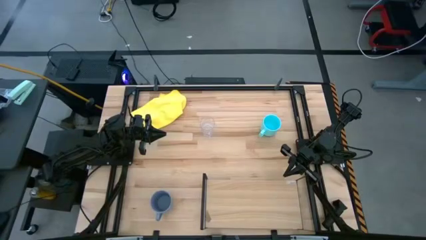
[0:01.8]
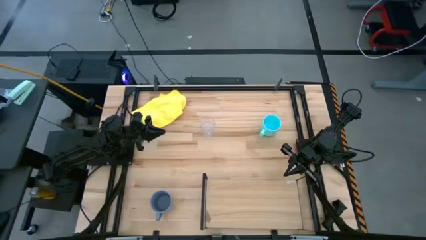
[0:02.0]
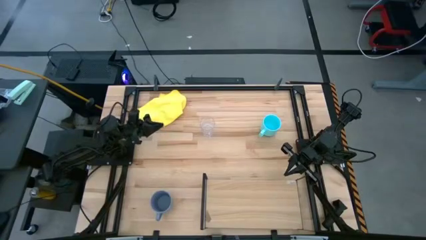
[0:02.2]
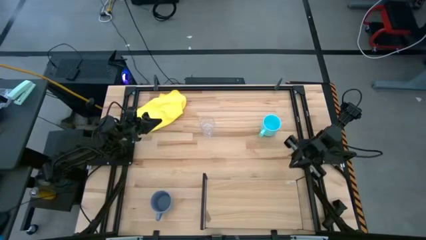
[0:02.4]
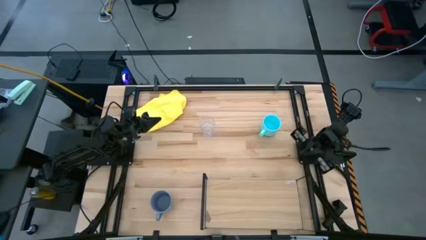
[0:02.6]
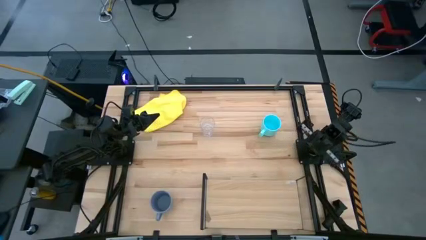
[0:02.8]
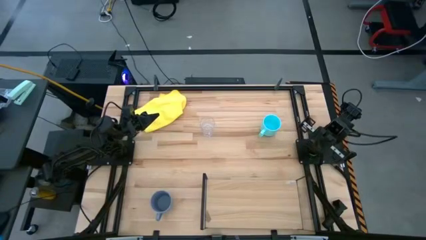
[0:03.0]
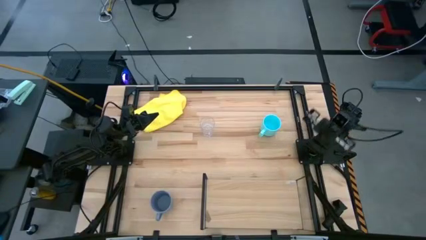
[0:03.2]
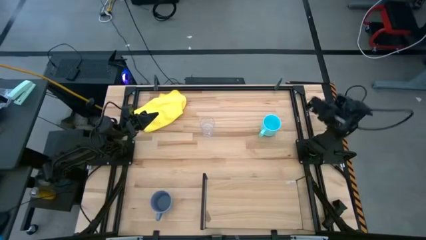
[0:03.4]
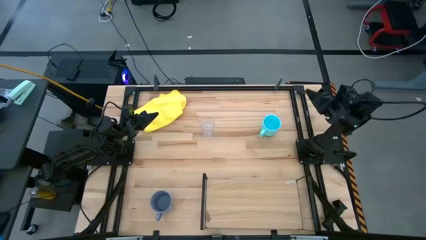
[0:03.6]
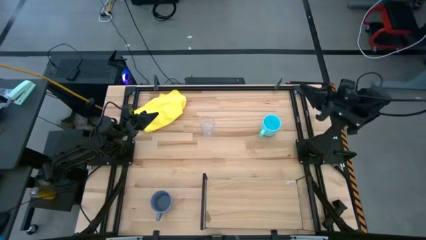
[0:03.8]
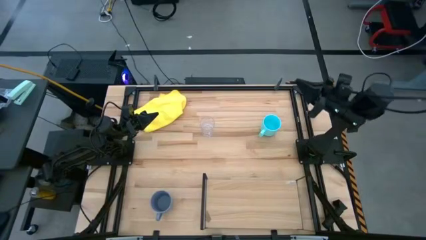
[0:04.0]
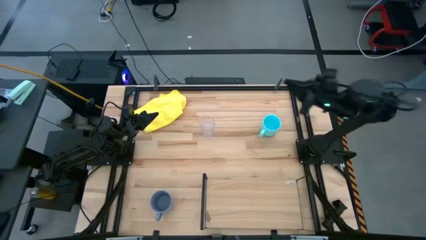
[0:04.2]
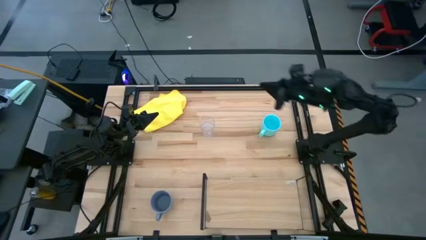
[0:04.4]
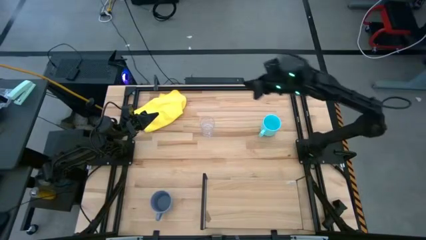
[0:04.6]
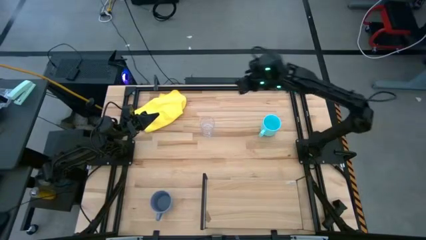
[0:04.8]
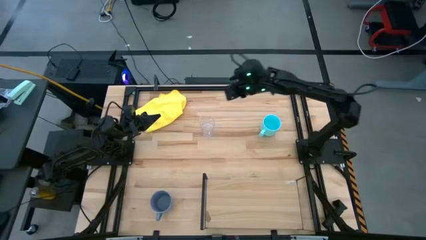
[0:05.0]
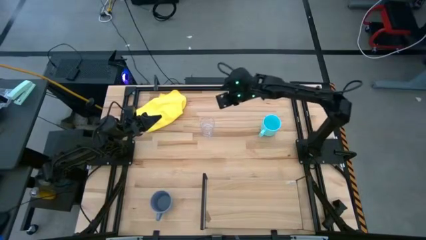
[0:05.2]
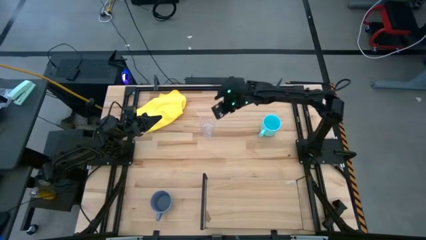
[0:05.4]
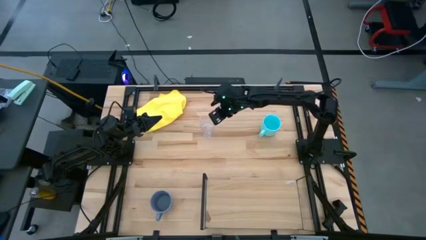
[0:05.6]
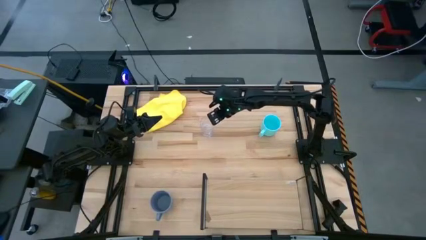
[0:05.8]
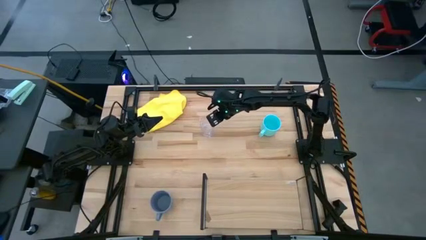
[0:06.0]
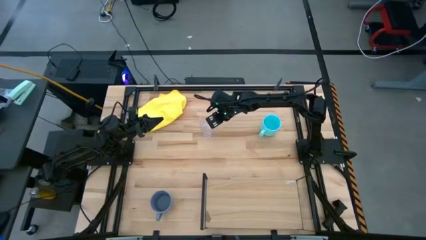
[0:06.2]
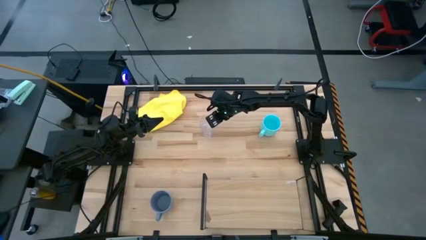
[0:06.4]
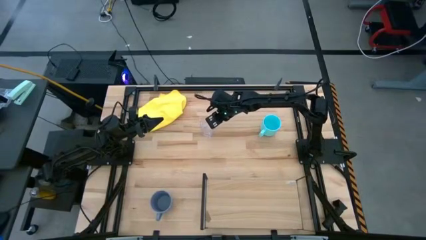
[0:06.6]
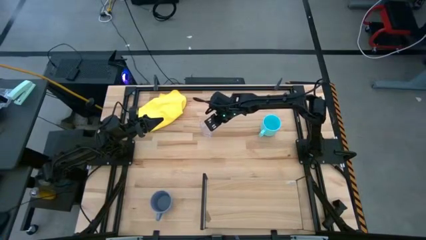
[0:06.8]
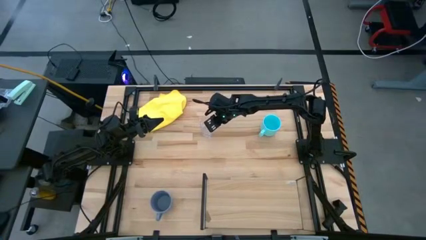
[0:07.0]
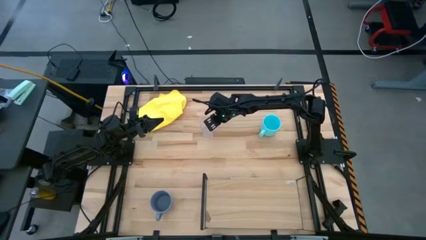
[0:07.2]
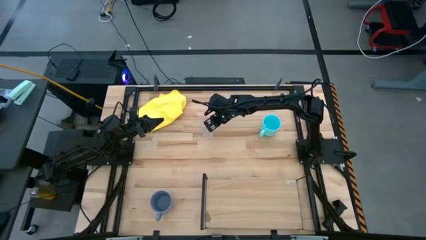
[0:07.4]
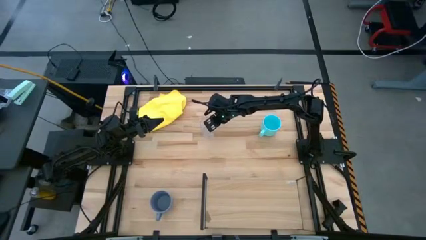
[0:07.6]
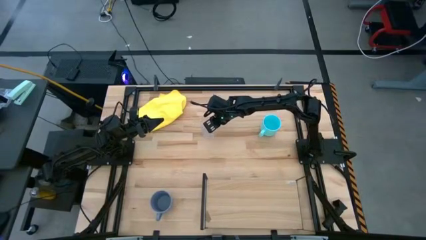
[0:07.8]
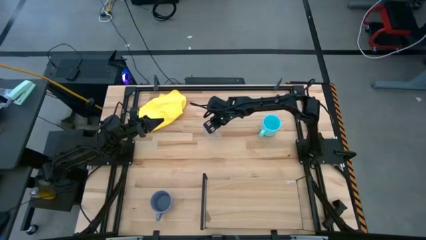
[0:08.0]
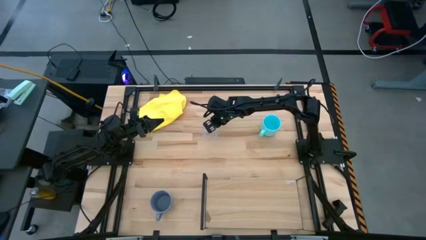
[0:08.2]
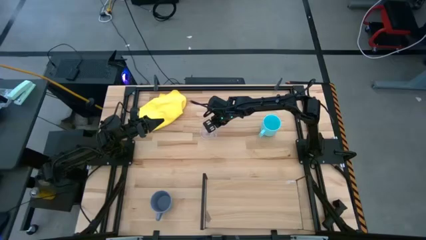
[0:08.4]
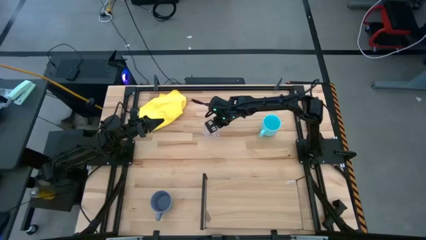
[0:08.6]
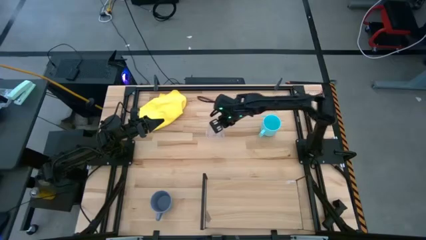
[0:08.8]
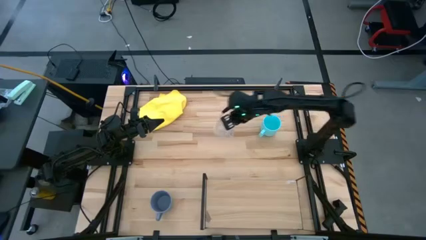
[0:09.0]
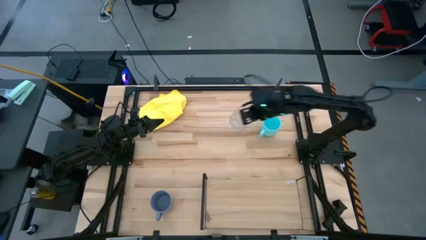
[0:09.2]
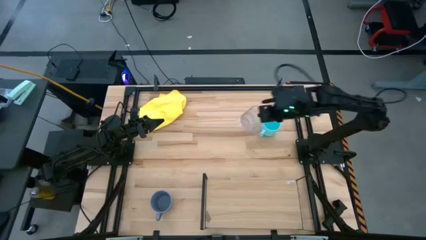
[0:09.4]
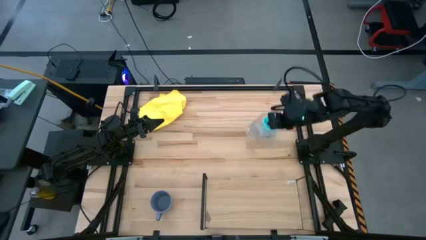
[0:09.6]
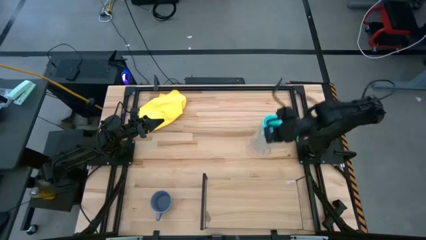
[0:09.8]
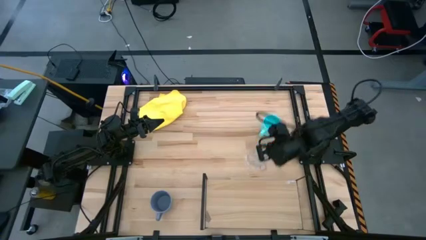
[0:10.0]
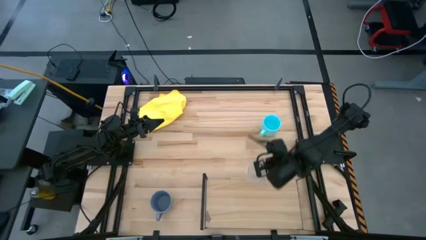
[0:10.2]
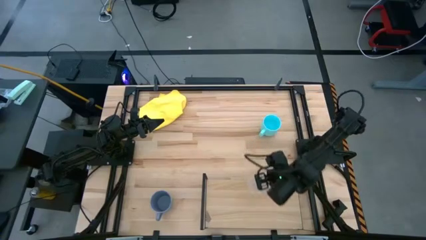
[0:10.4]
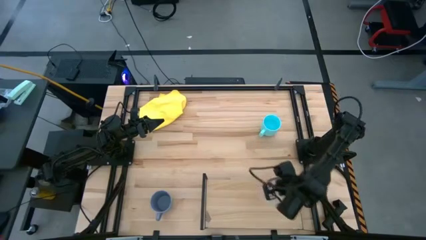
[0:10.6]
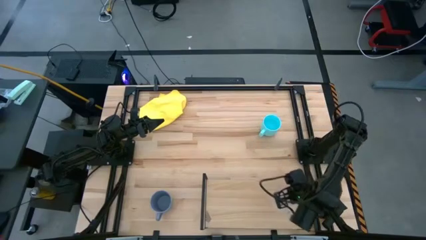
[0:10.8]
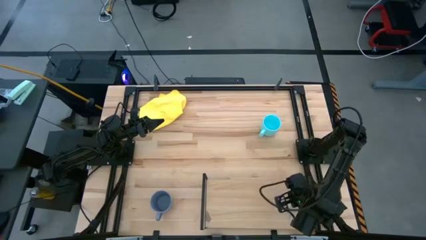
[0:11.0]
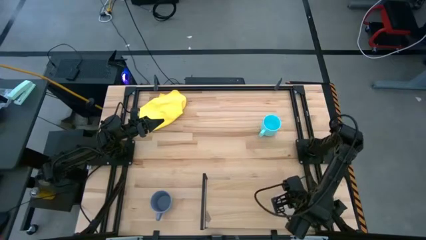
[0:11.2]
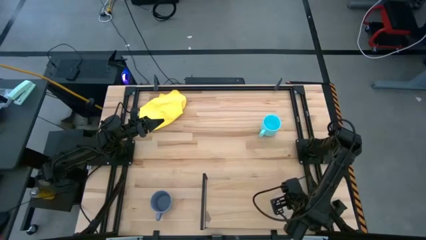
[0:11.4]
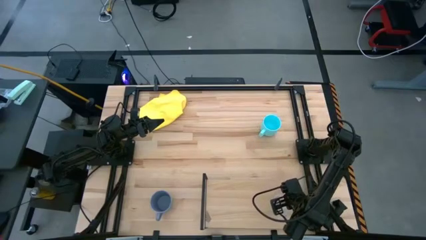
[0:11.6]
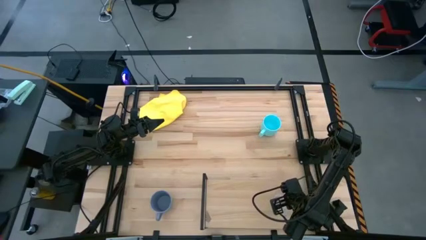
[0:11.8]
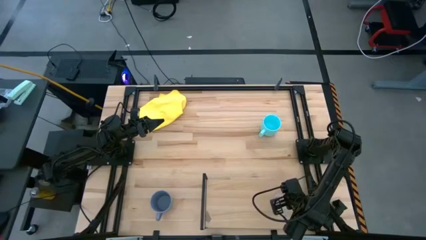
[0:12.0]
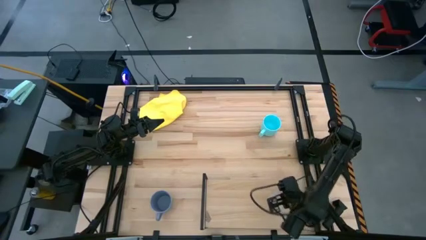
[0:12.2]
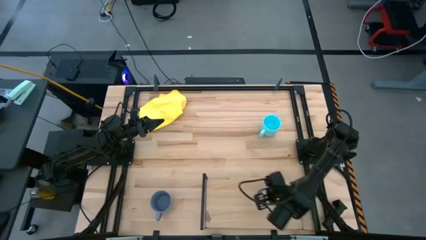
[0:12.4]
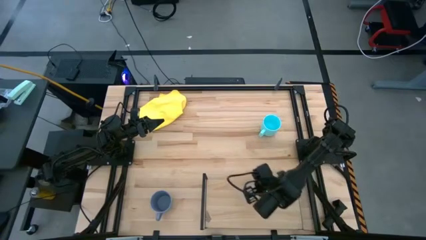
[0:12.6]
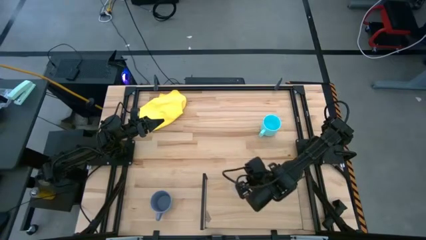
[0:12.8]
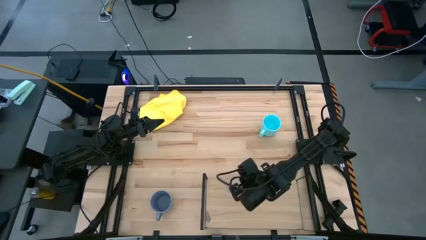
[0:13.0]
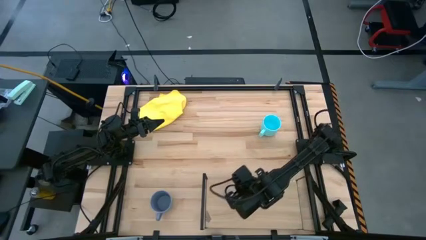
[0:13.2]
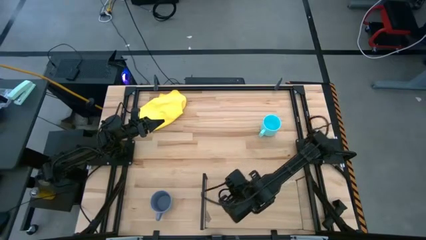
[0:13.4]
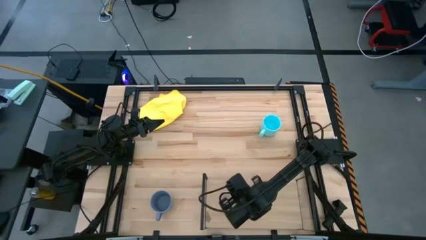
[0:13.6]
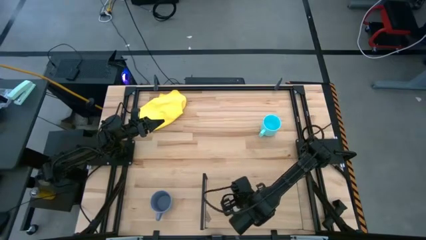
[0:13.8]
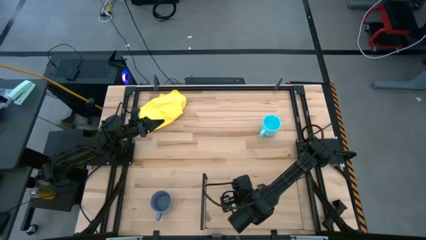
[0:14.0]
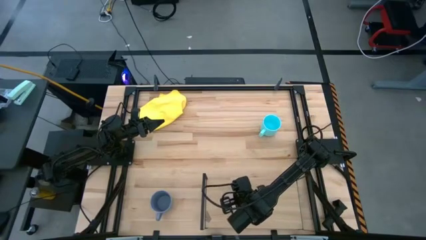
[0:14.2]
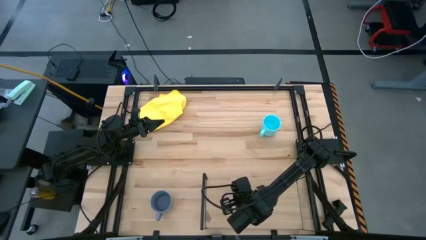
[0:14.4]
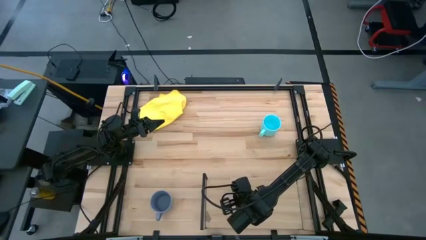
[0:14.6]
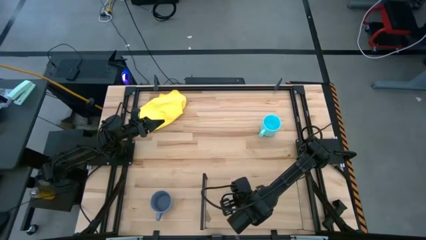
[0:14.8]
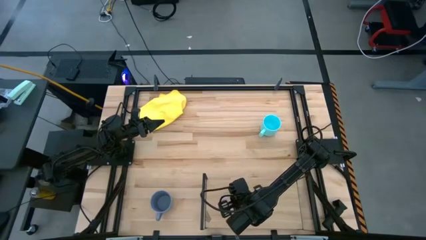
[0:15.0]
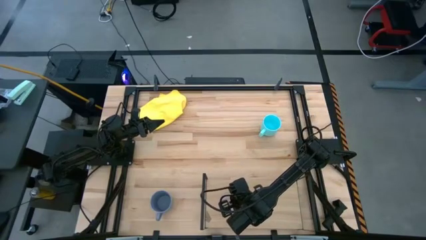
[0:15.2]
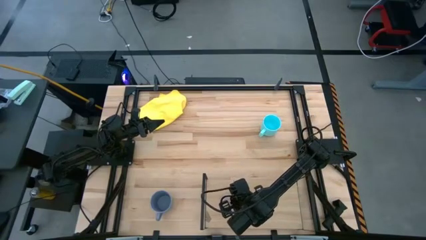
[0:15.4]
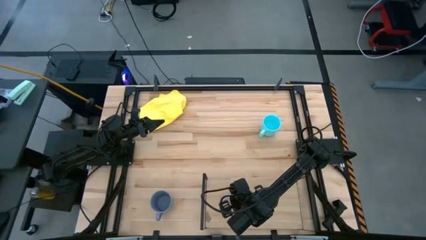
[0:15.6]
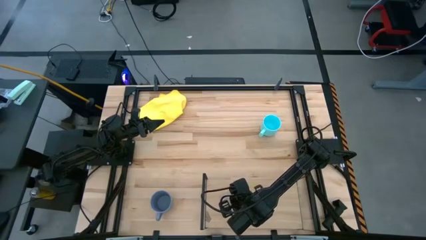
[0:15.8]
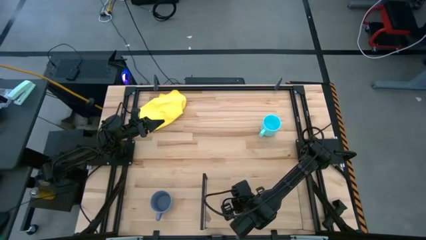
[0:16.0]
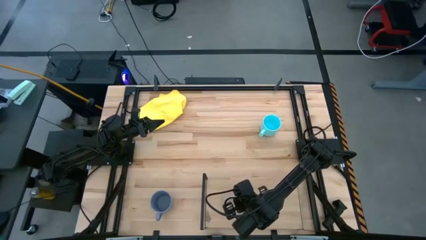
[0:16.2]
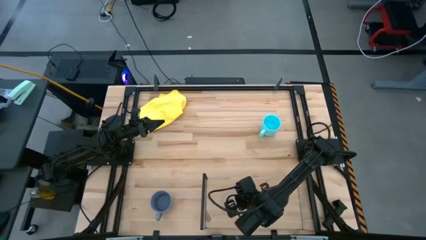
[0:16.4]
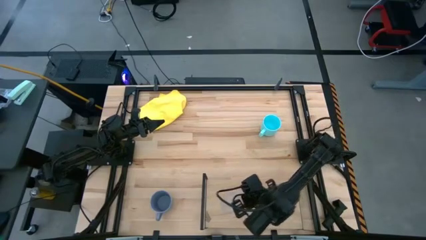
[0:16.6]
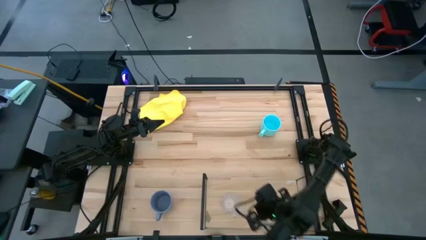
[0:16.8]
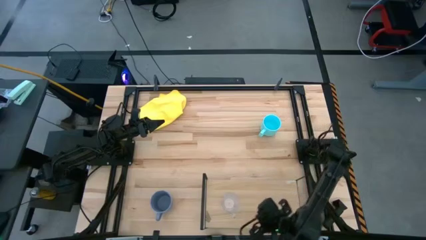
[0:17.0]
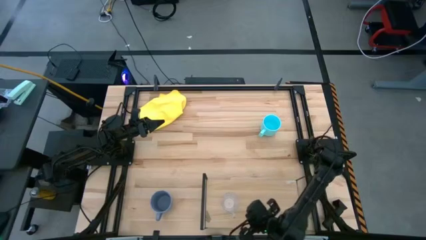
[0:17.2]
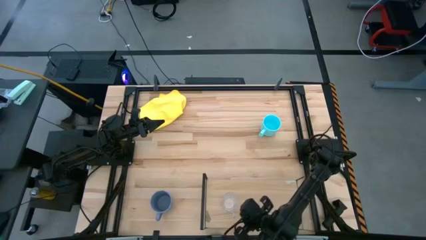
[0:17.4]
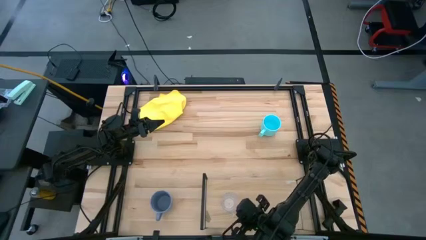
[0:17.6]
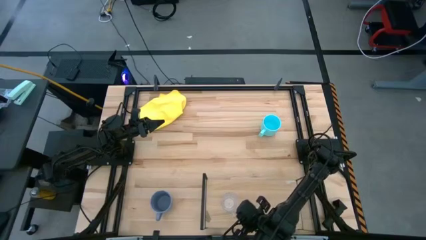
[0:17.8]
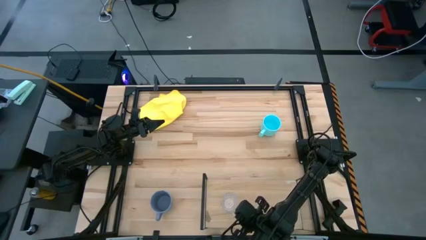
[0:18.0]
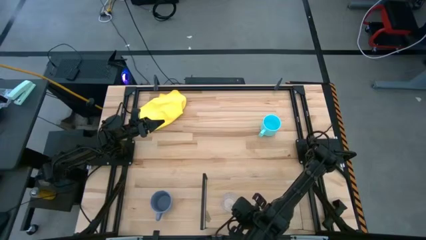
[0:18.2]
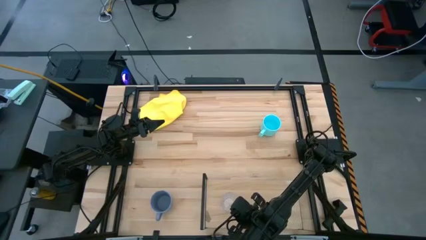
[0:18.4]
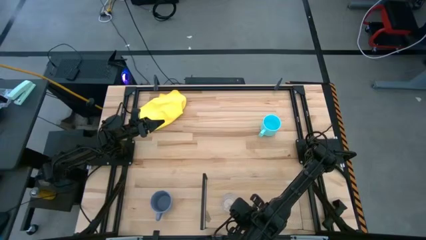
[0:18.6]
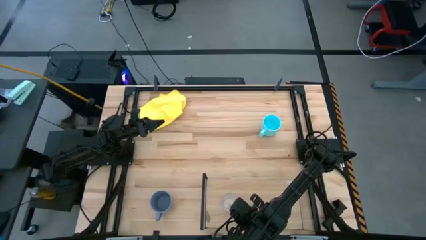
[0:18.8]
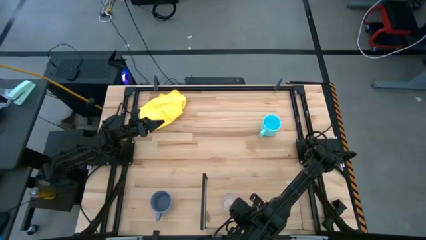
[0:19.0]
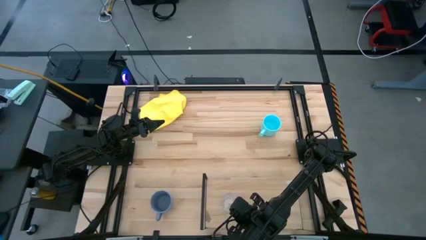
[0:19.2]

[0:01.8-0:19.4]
Task: Stack small to large cups/mugs on shelf
Put the transparent mug on the shelf
